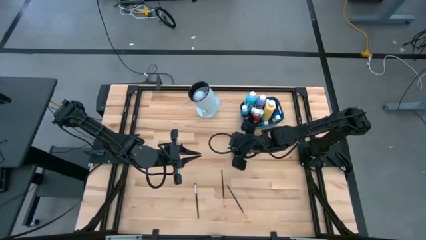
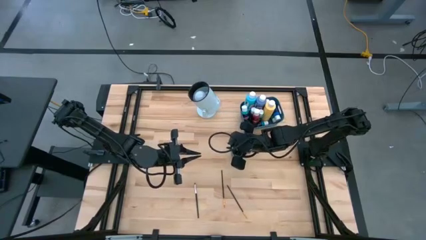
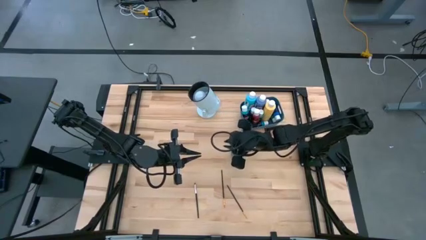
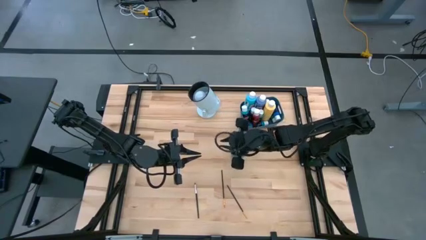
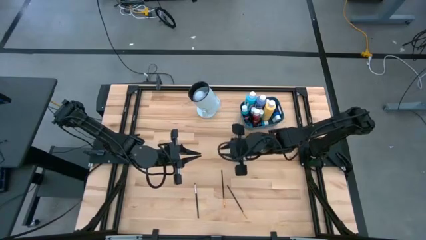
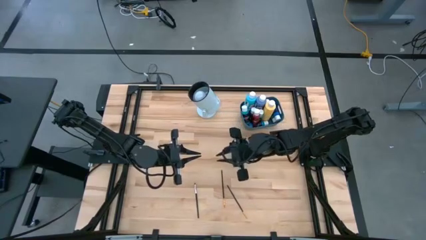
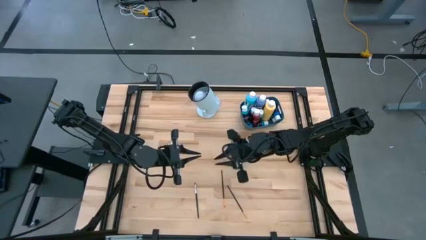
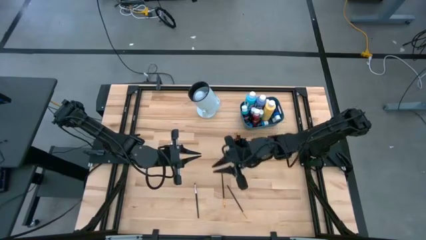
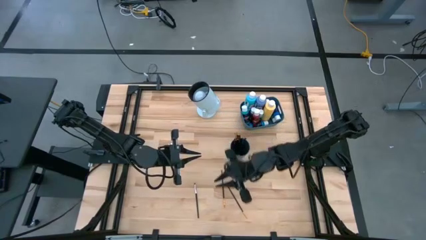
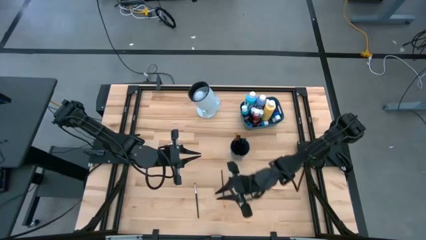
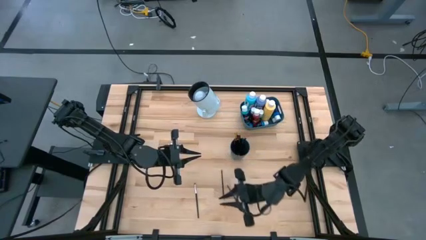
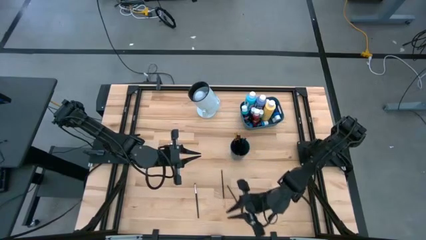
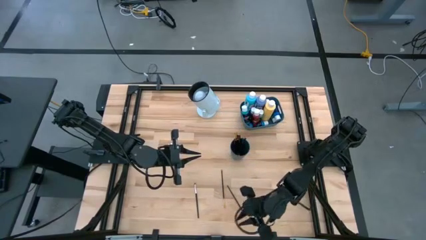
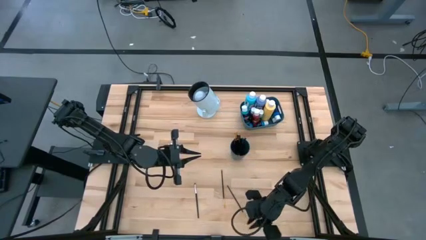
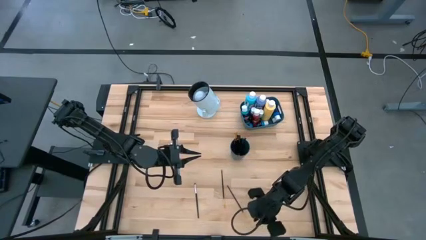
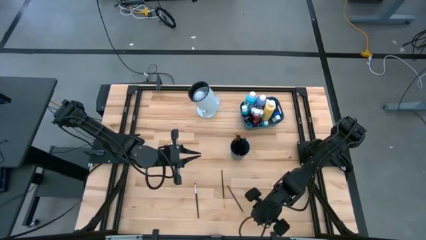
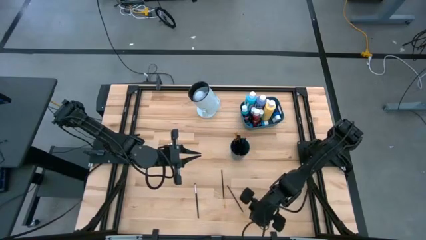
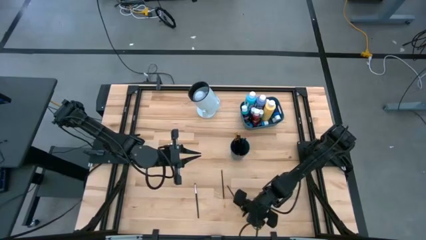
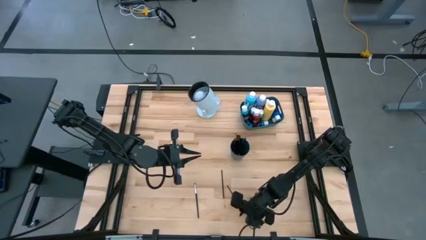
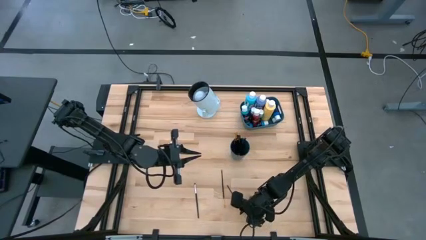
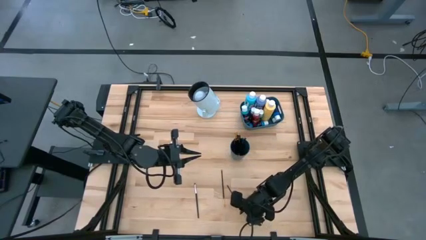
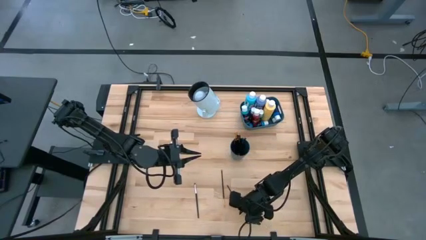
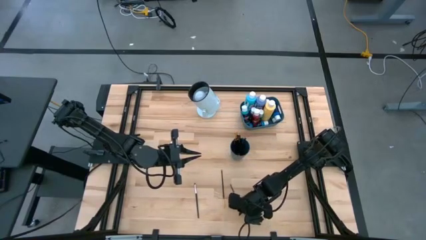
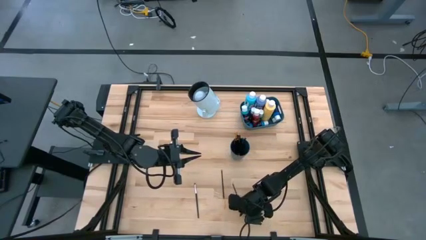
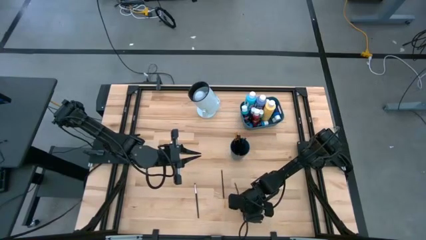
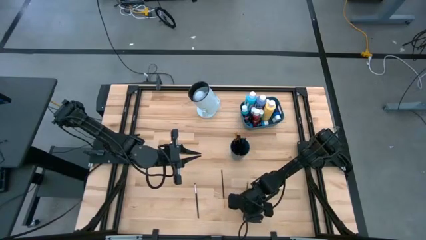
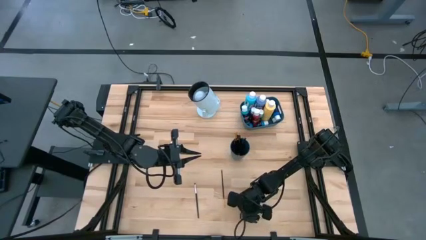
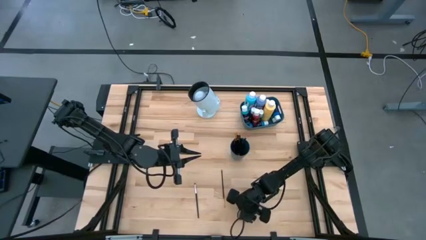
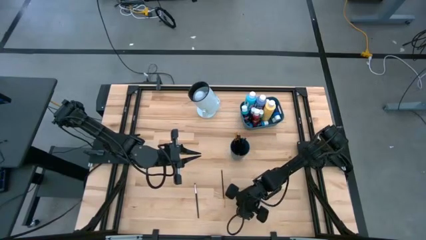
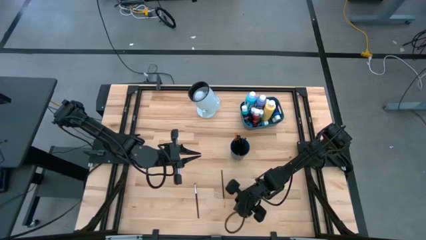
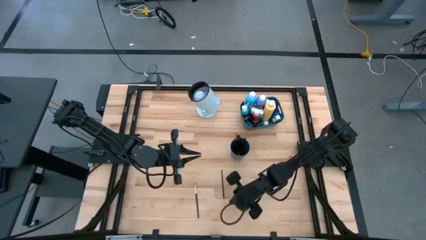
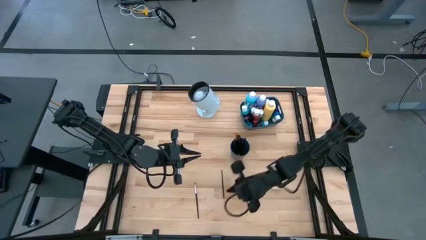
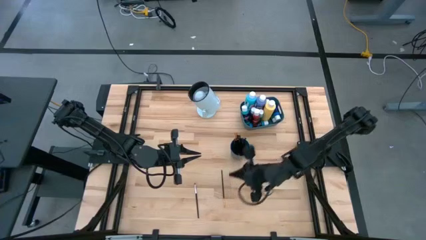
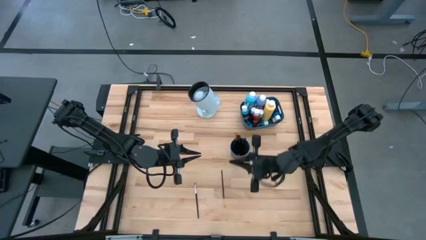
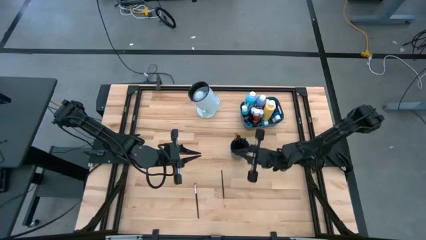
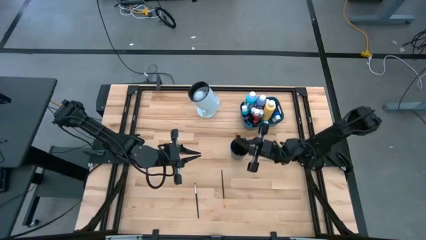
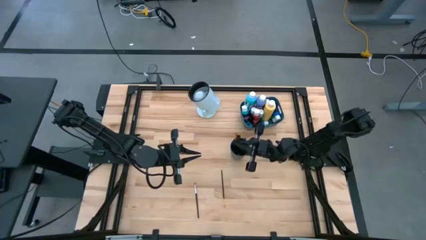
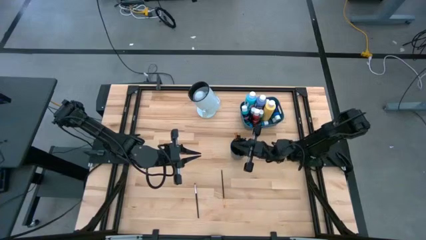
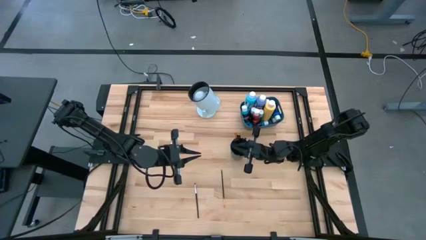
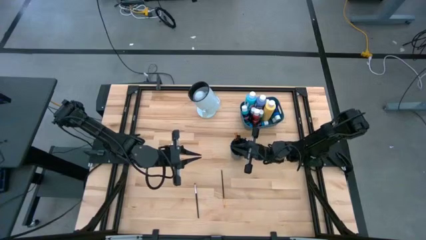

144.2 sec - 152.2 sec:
Task: Pick & Place Paint Supplies
Put the gold paintbrush into the blue cup

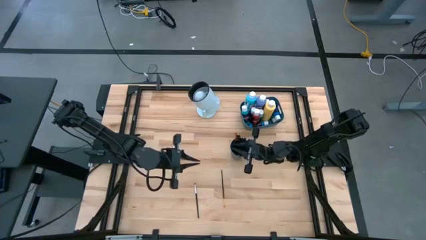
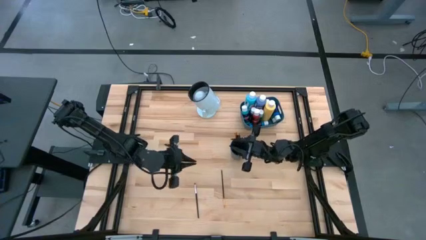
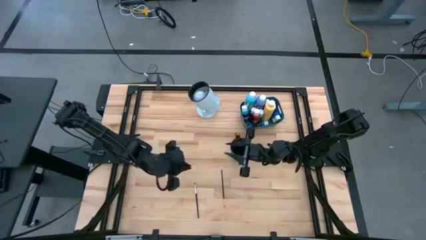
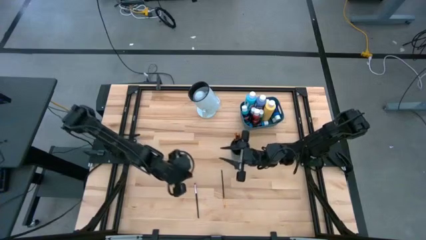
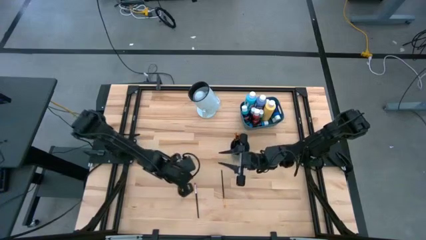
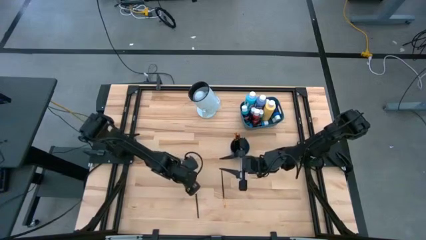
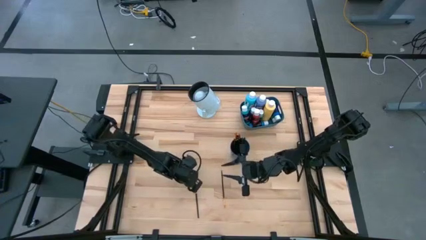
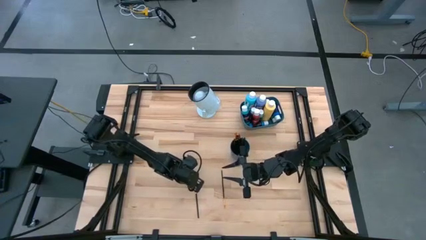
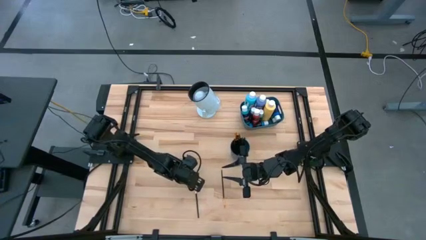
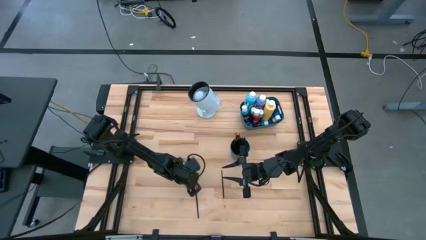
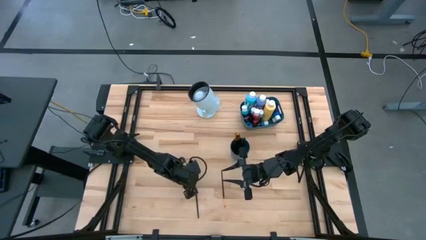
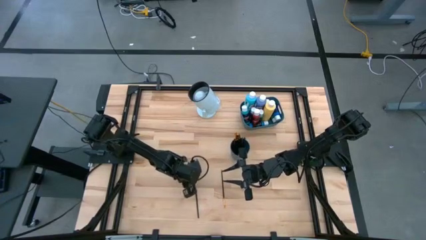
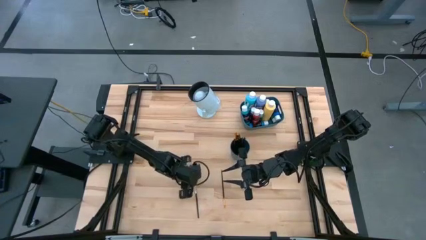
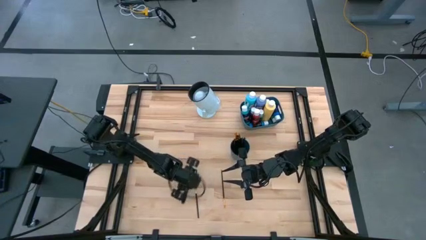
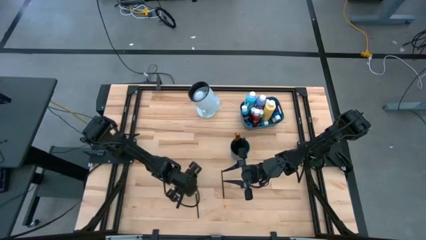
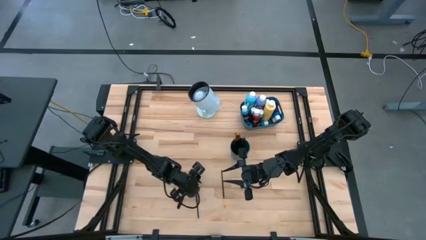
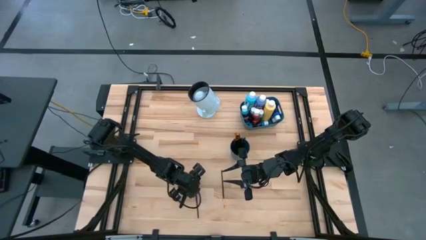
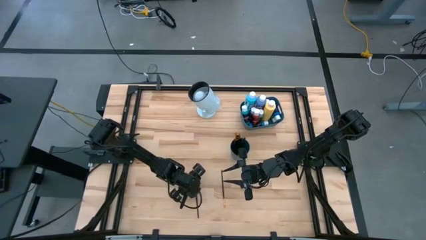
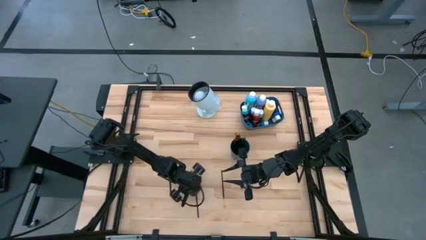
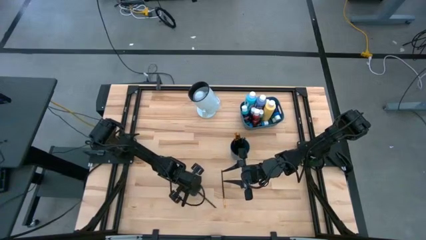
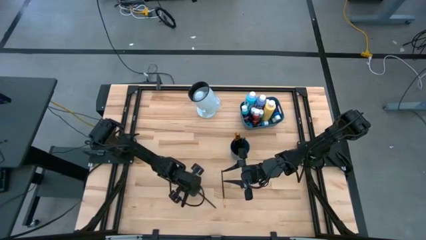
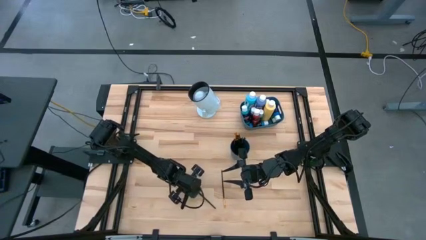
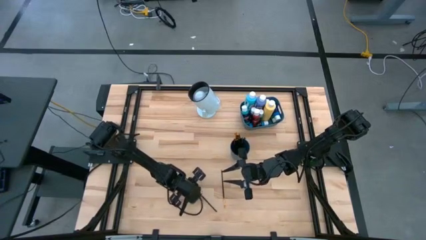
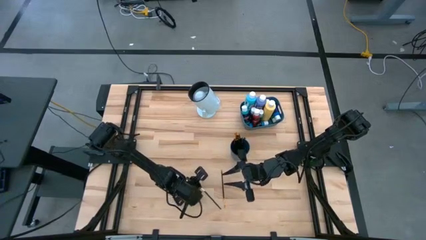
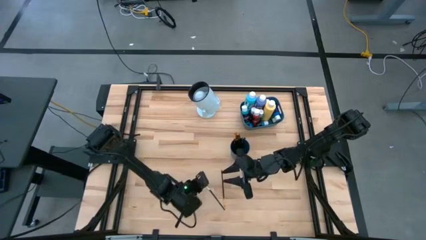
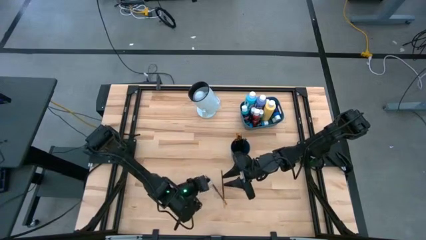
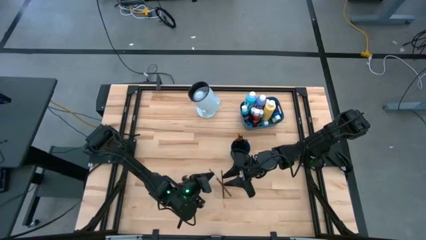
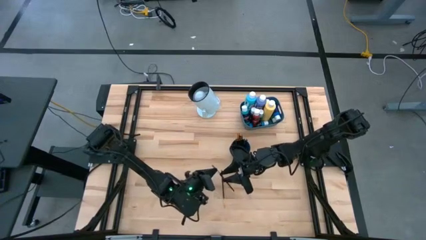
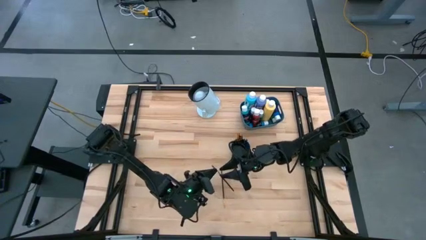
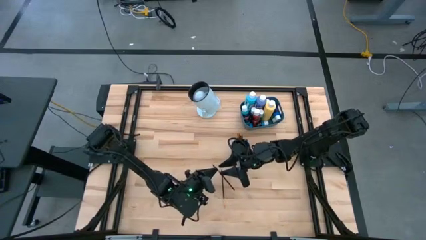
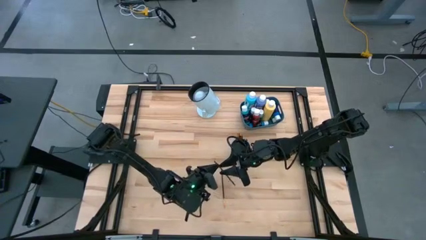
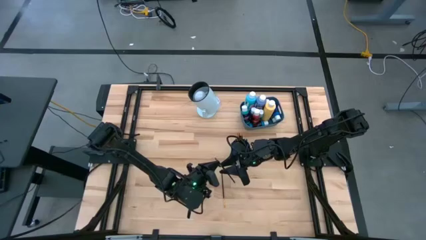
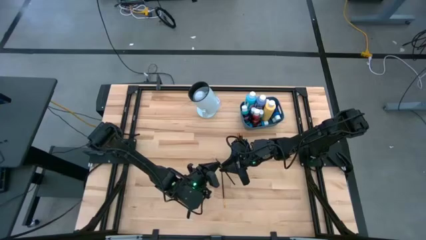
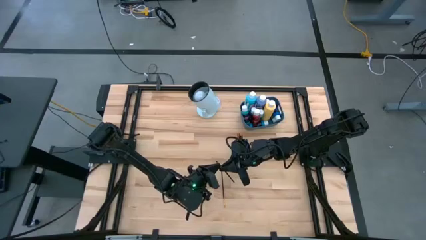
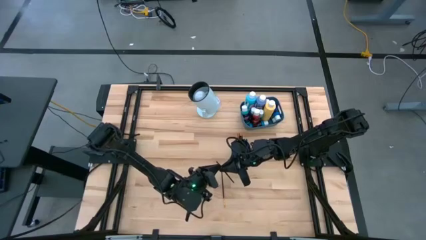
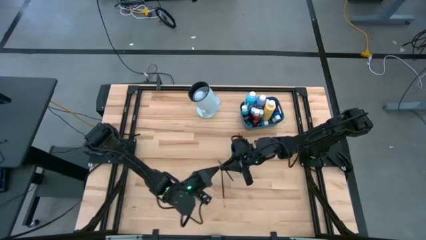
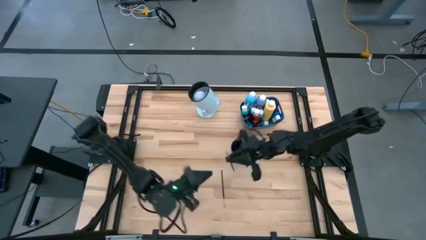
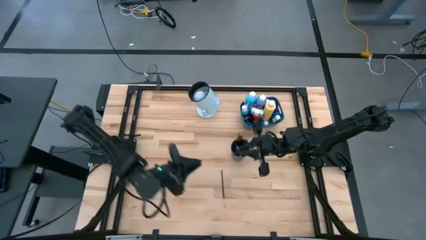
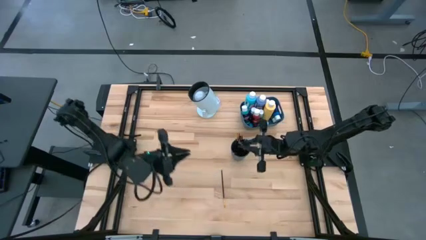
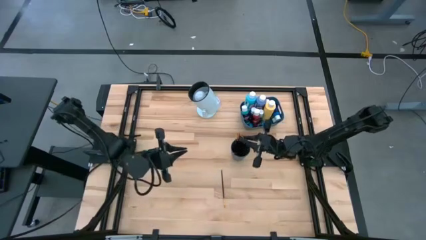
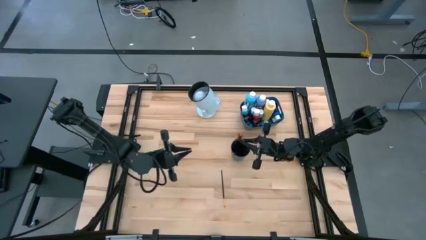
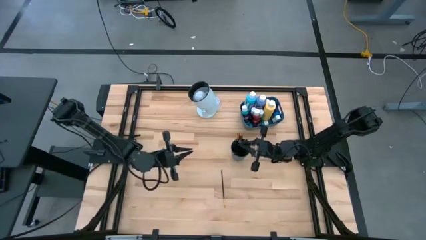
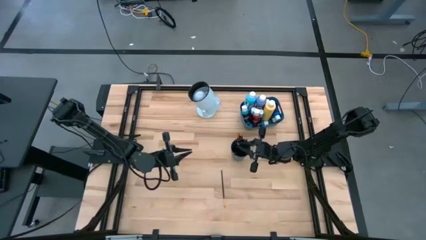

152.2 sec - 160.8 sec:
Put the silver paintbrush into the blue cup
